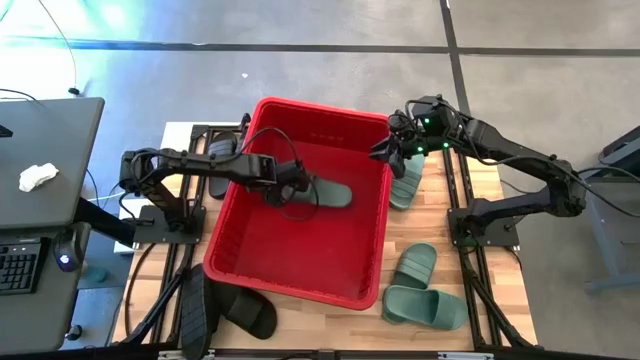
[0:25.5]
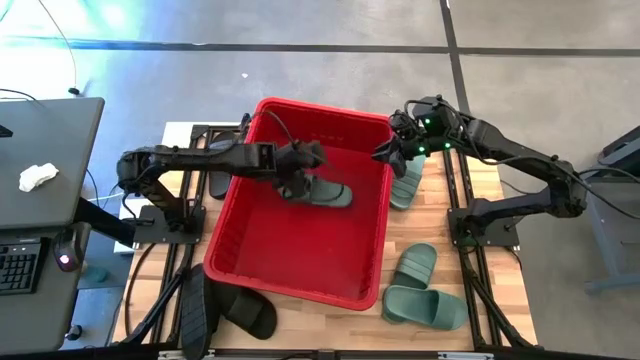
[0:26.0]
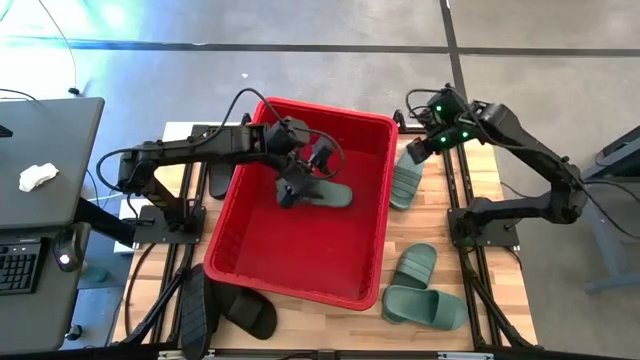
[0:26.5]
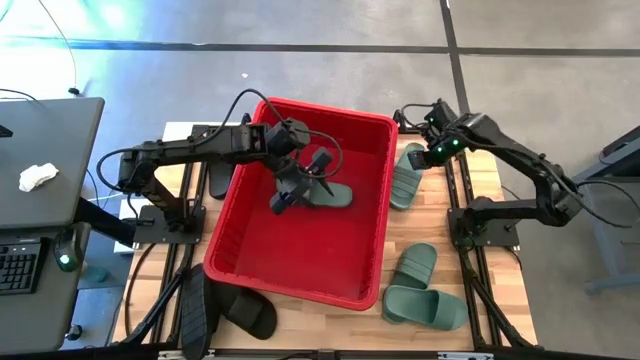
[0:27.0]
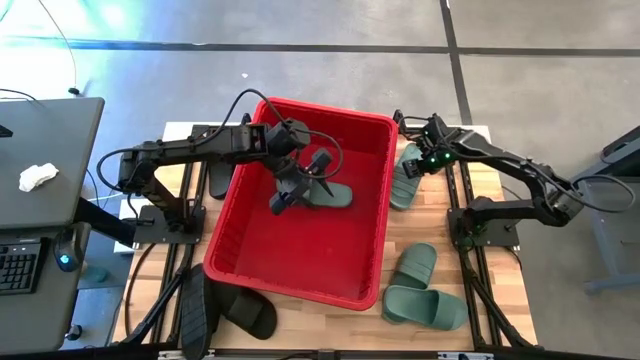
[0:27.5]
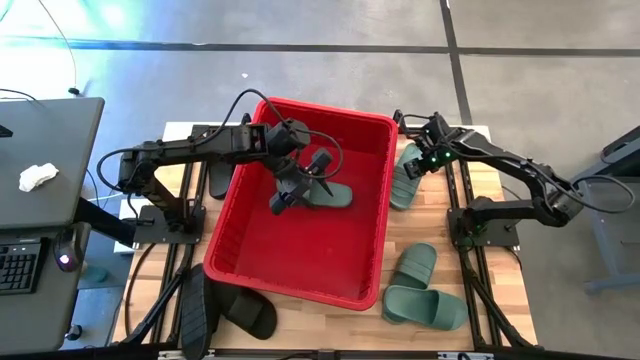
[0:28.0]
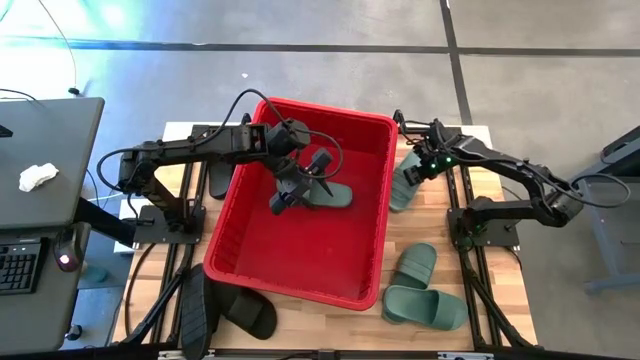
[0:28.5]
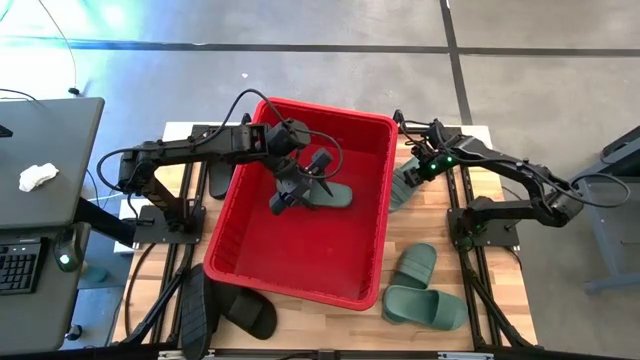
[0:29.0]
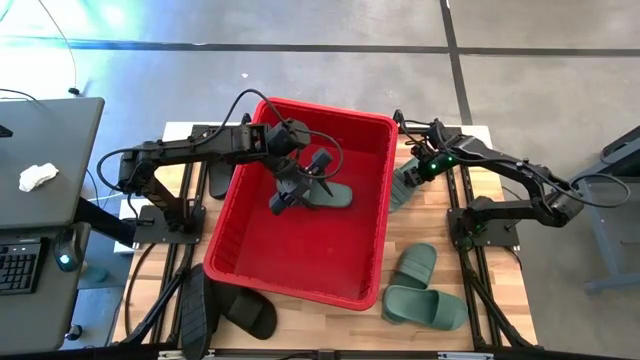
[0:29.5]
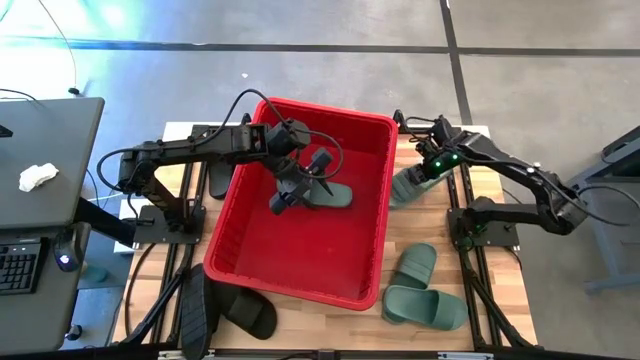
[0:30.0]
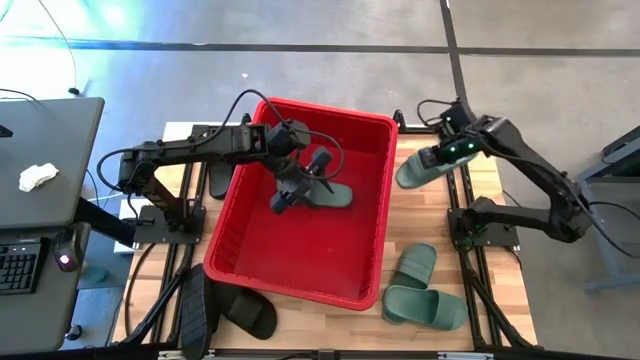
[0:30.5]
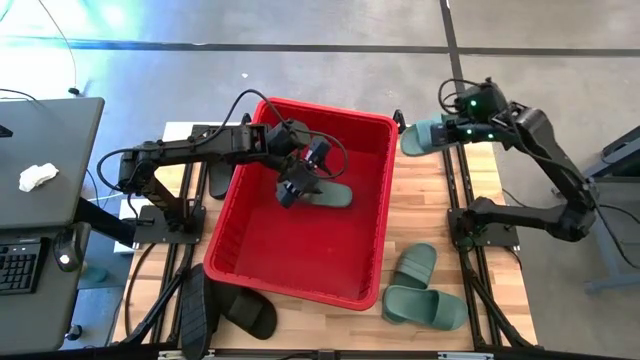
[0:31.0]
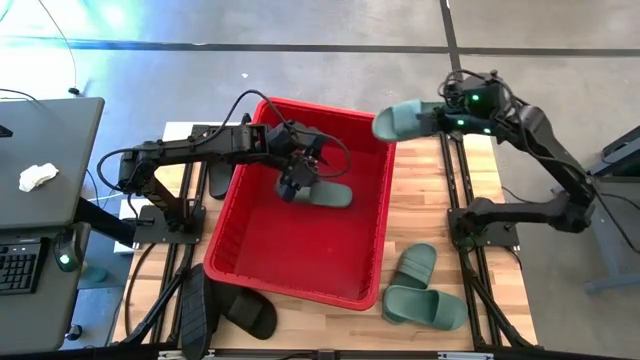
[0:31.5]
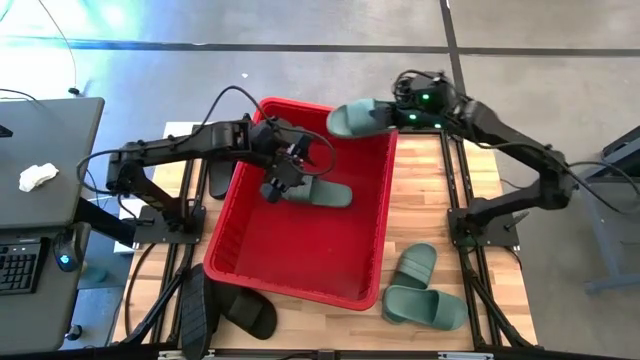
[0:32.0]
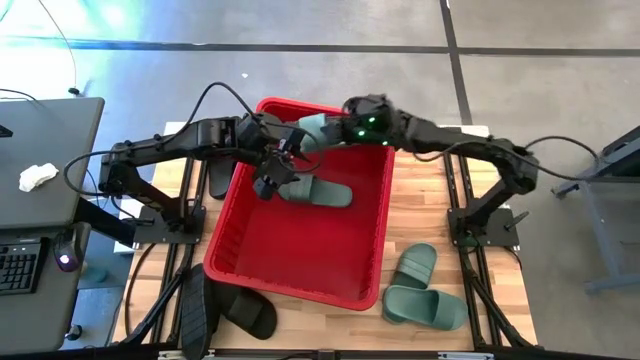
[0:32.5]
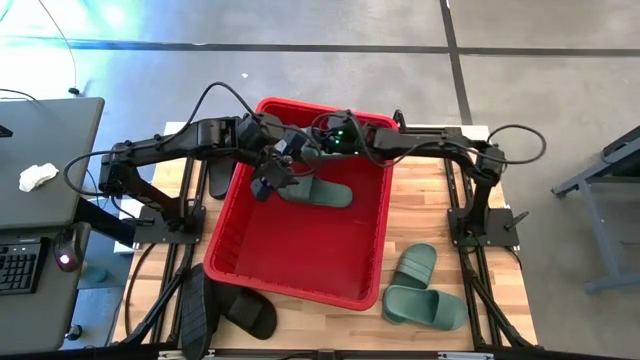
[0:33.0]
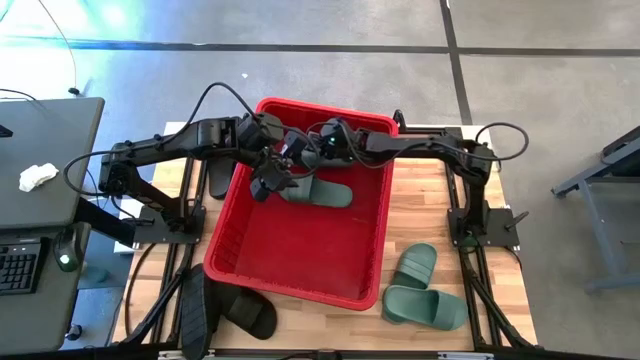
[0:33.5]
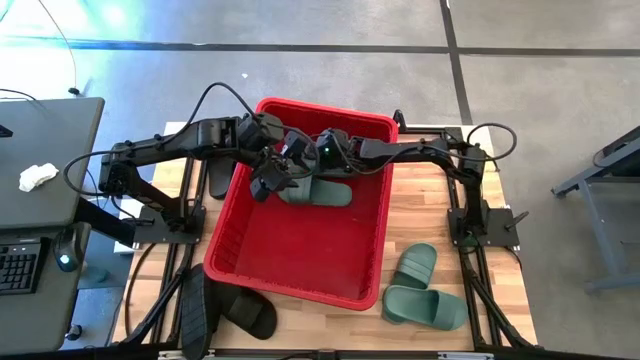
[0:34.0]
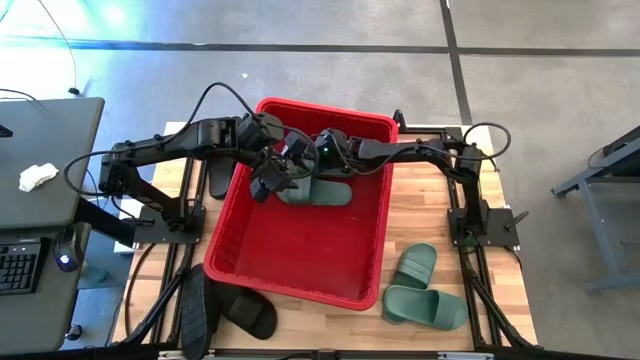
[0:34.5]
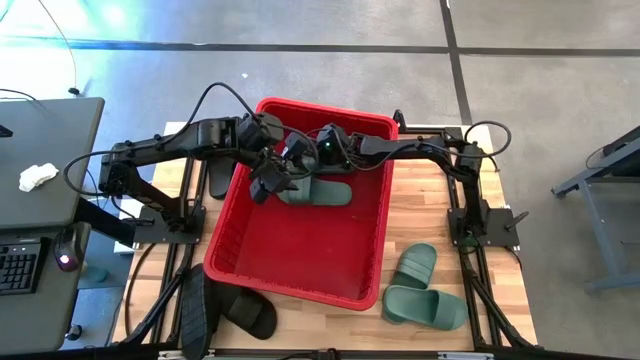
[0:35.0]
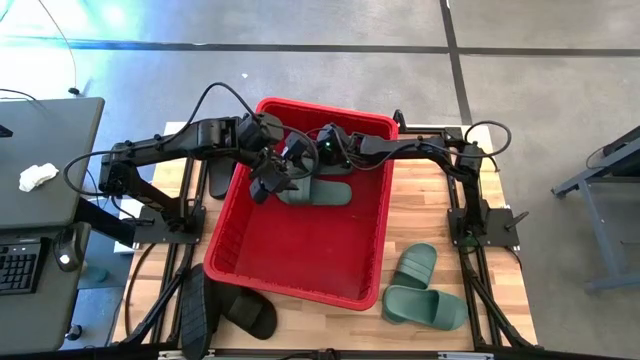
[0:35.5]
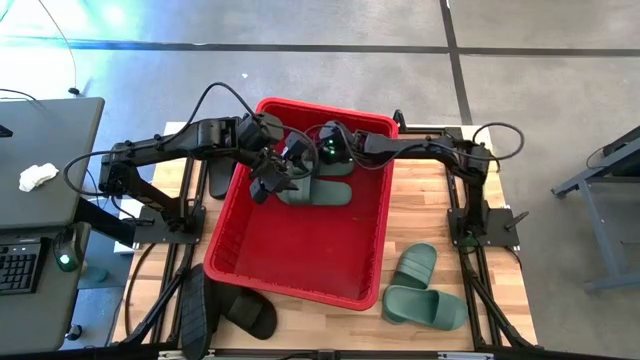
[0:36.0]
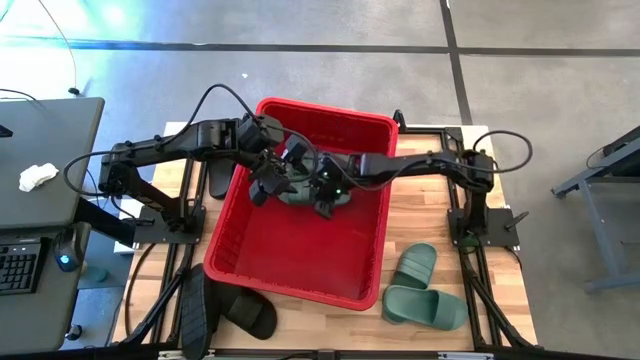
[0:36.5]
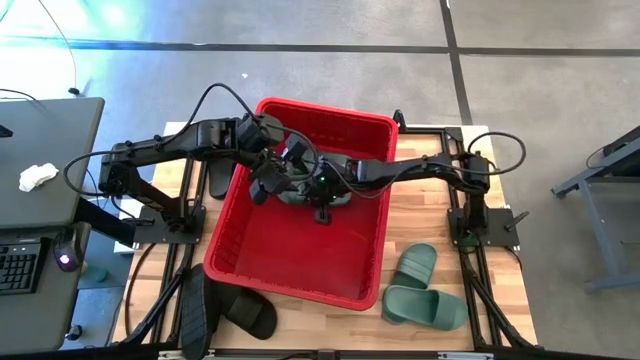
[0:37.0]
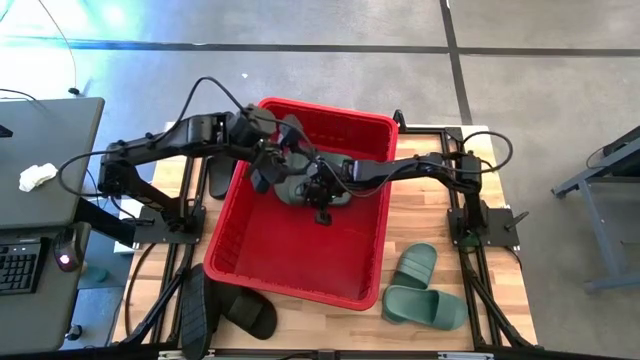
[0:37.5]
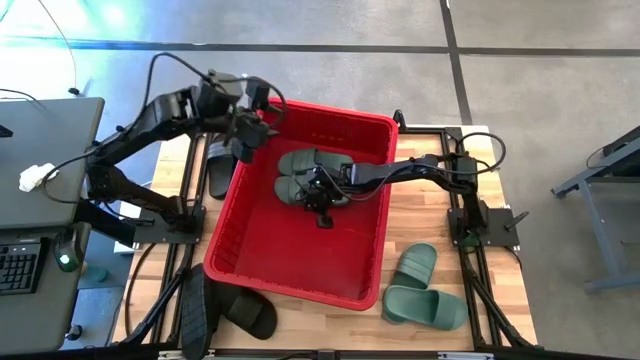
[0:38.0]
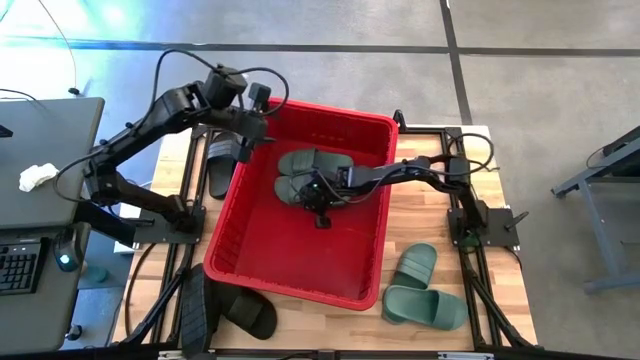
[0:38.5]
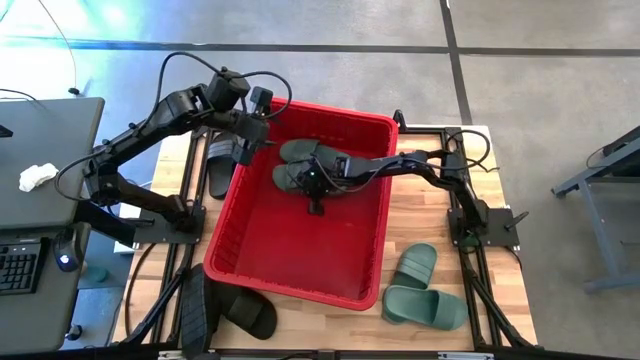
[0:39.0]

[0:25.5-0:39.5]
Task: Pick and place slides into bin
Put the green slide into the red container

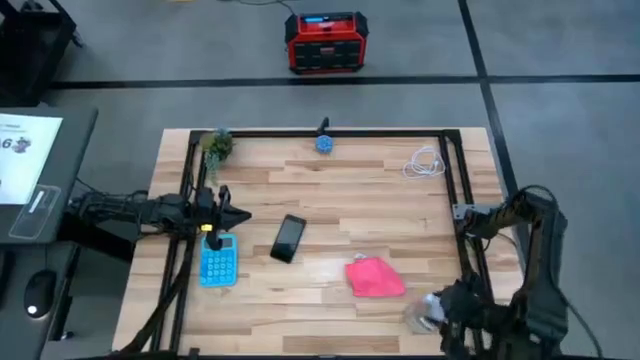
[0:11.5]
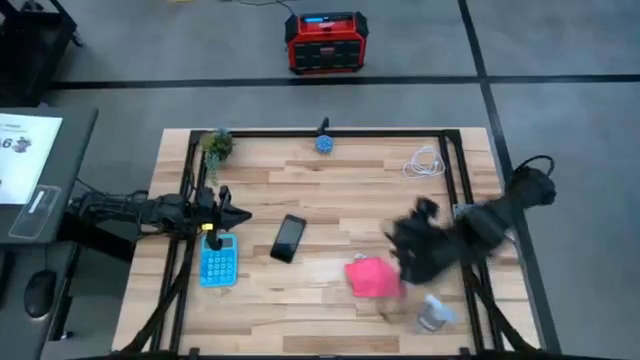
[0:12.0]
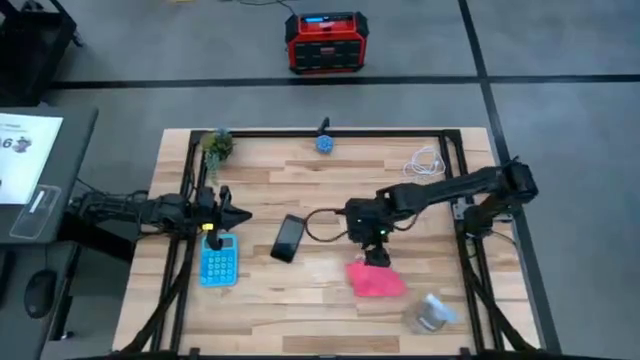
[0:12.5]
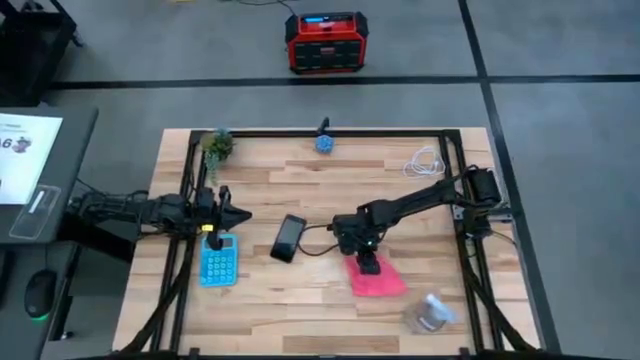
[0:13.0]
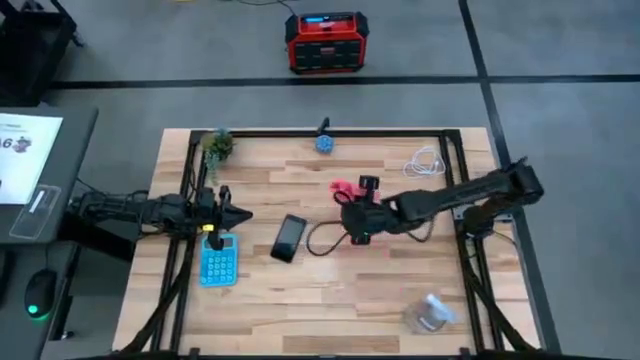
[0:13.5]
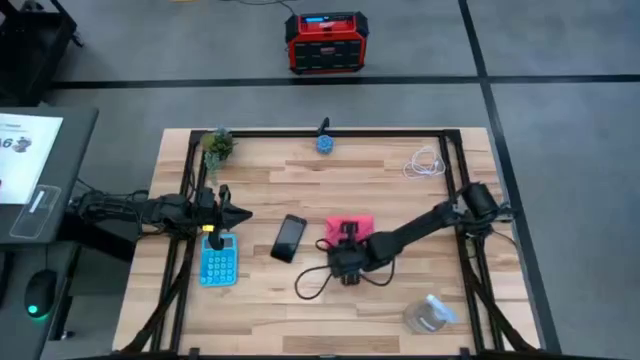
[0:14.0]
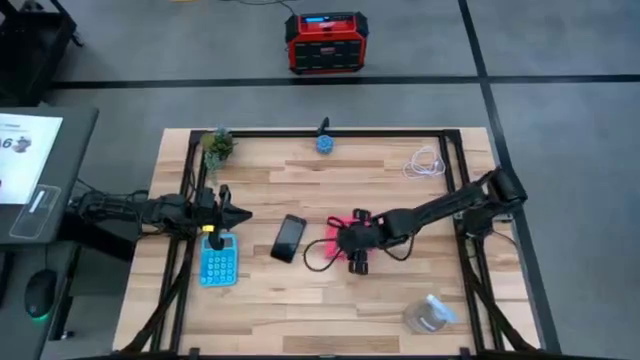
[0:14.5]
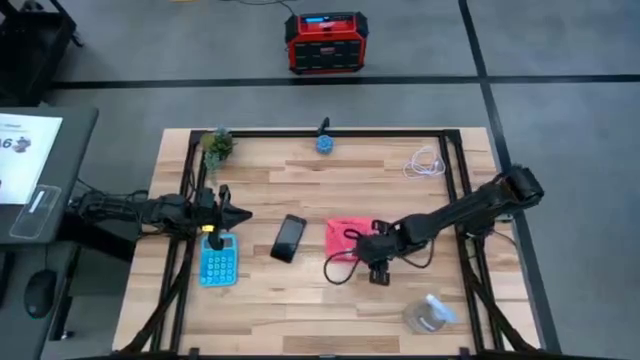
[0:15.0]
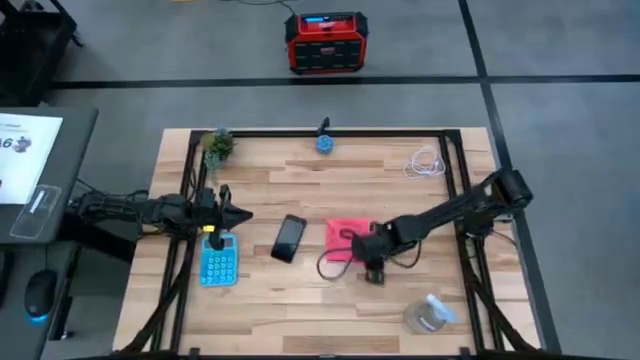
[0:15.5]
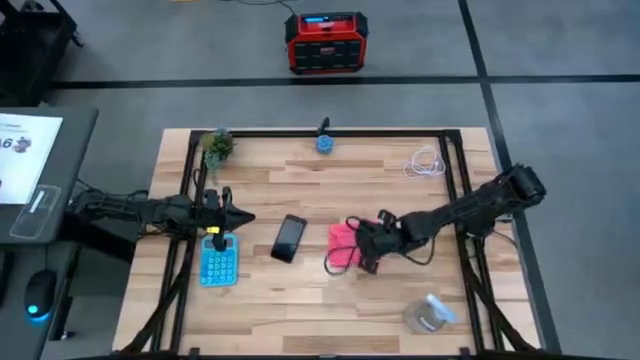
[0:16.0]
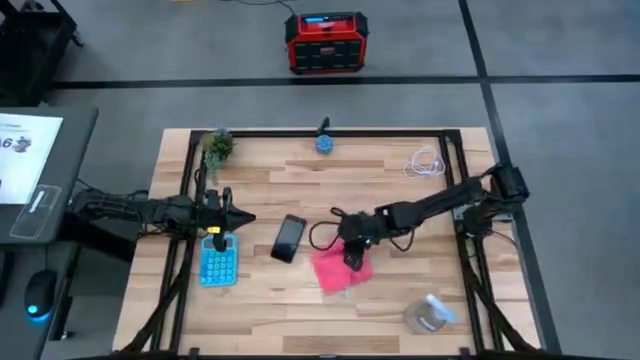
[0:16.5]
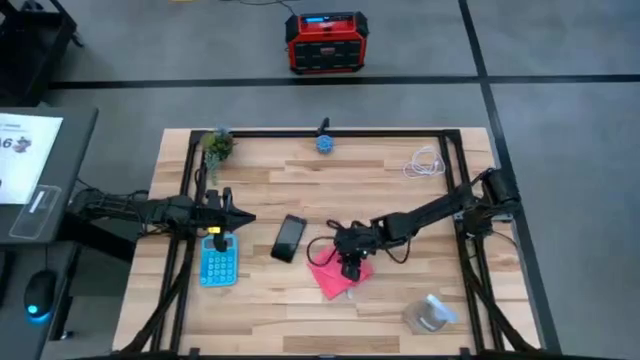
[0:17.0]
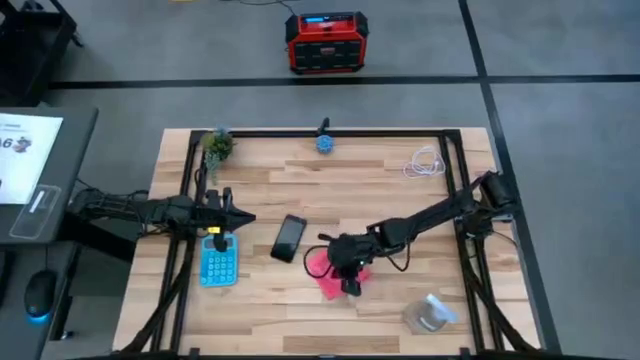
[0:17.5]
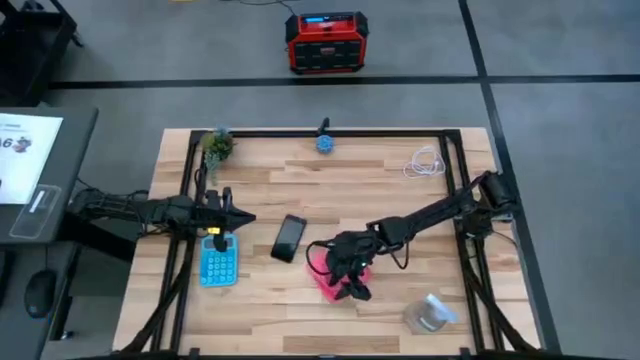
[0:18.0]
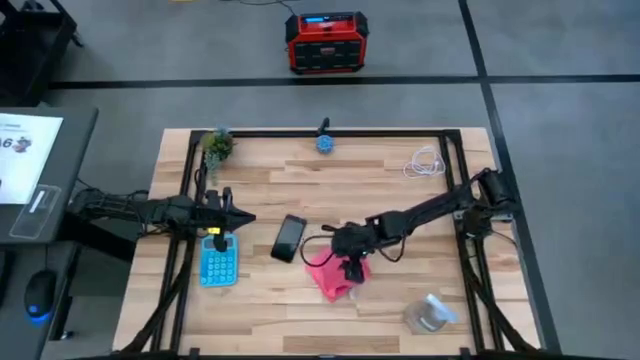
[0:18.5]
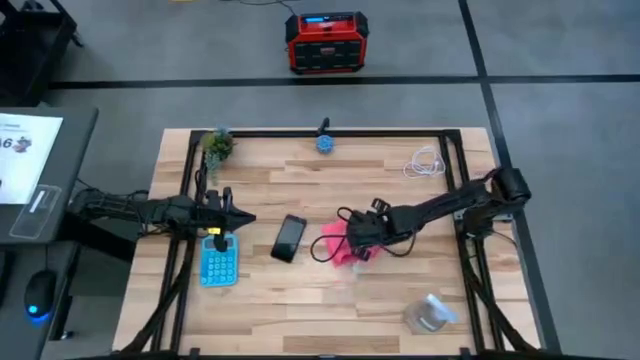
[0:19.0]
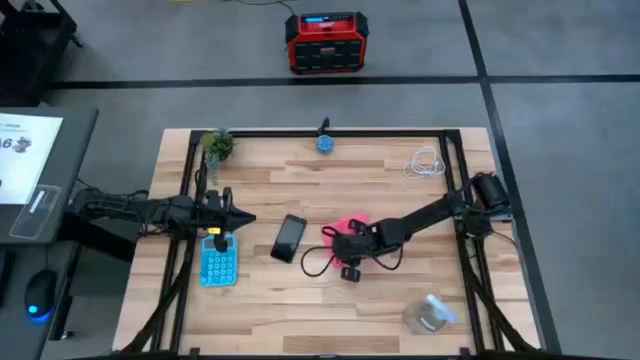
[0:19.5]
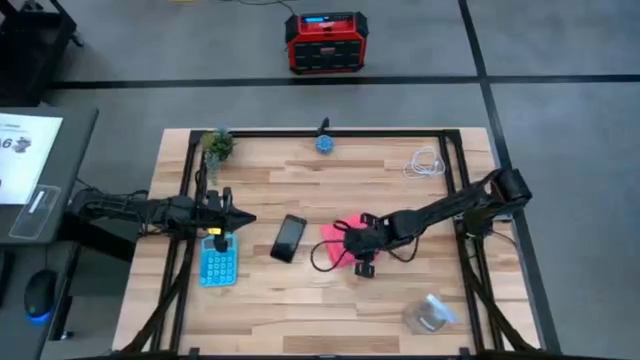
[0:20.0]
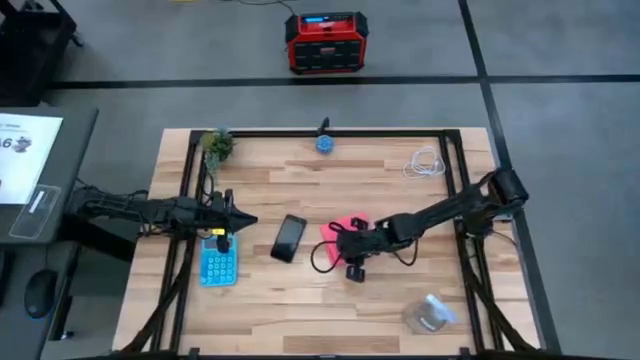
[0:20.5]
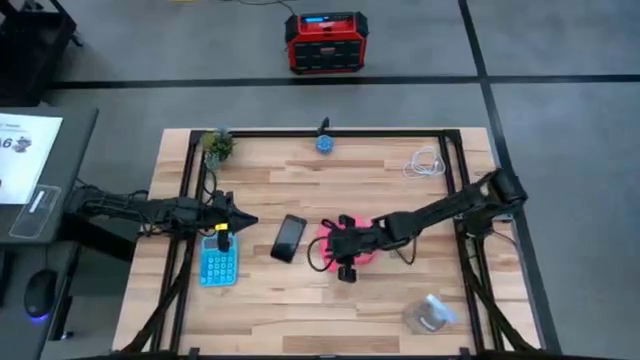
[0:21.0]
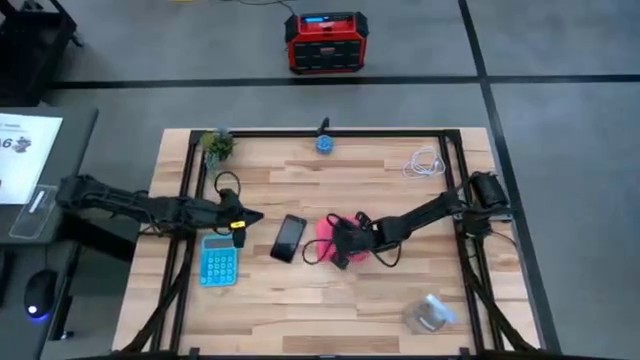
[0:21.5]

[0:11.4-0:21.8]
Task: Apply microfiber cloth
Adjust the pink microfiber cloth
